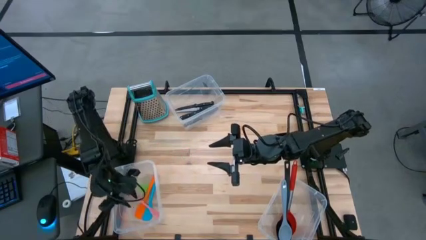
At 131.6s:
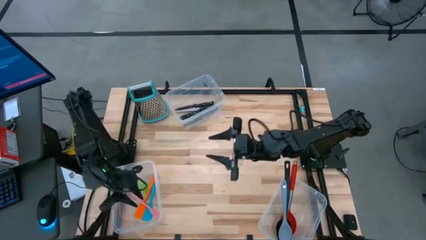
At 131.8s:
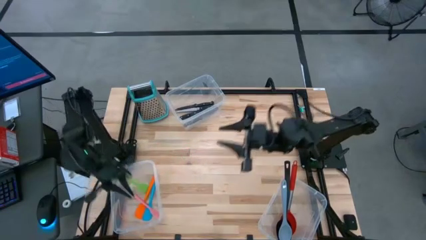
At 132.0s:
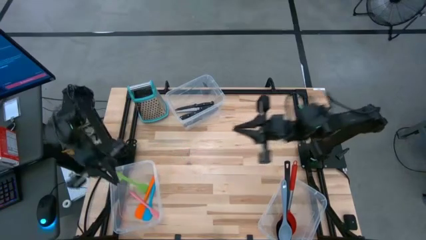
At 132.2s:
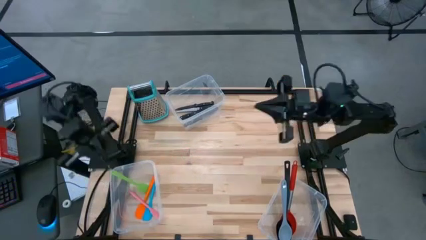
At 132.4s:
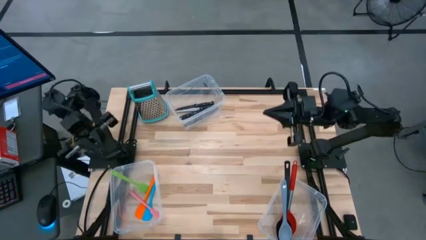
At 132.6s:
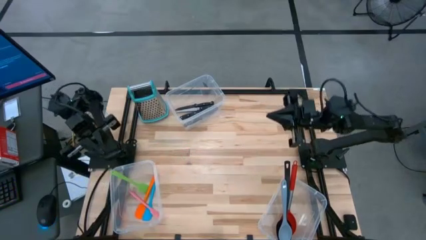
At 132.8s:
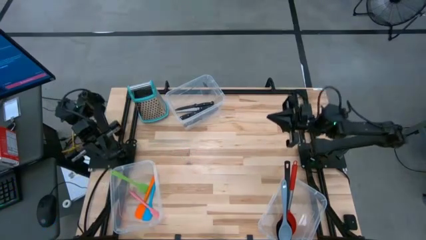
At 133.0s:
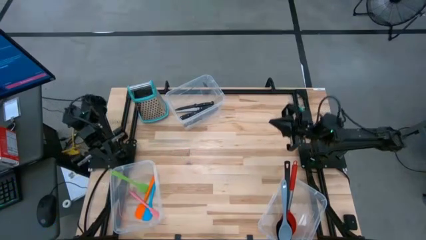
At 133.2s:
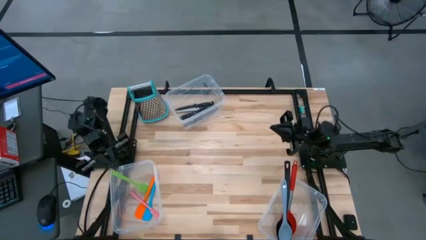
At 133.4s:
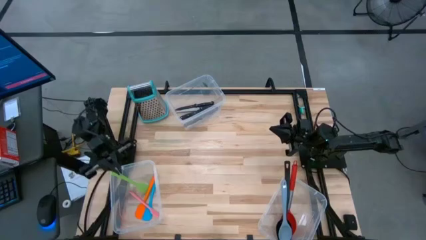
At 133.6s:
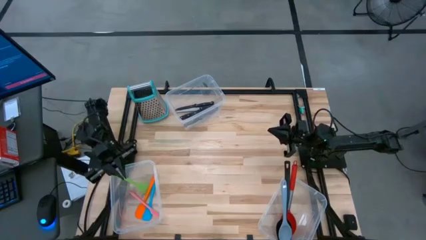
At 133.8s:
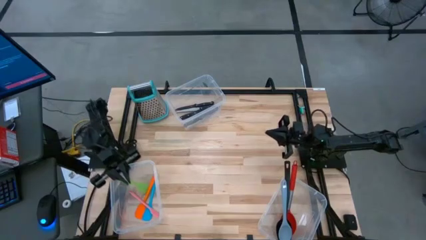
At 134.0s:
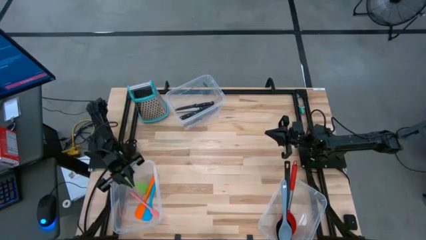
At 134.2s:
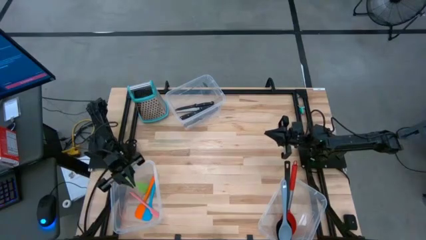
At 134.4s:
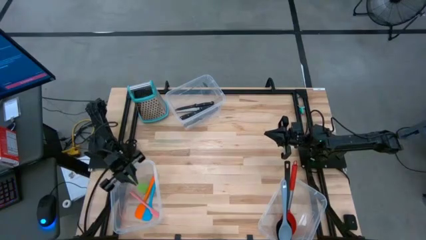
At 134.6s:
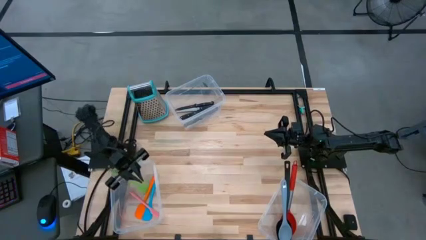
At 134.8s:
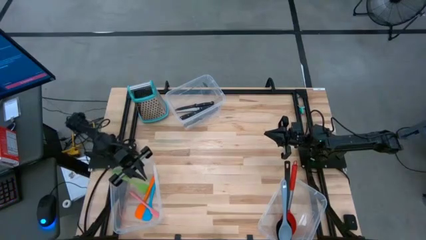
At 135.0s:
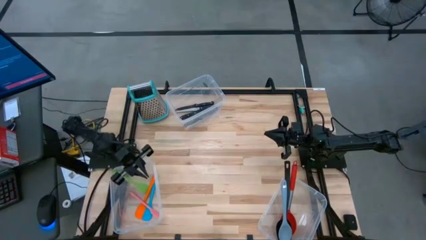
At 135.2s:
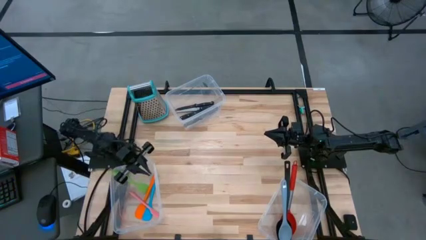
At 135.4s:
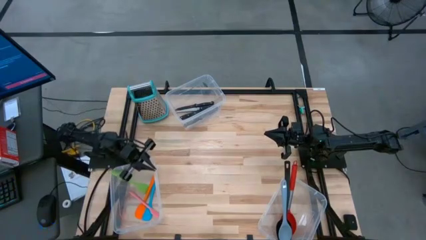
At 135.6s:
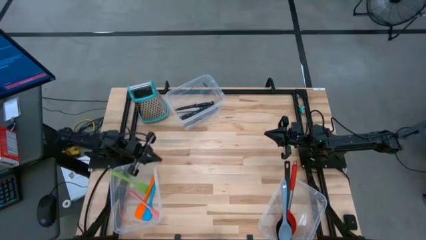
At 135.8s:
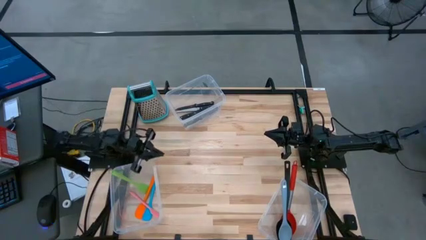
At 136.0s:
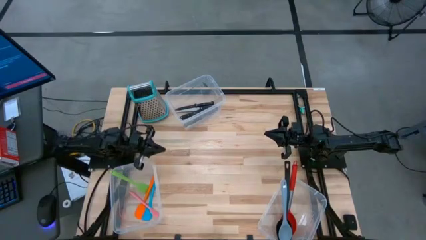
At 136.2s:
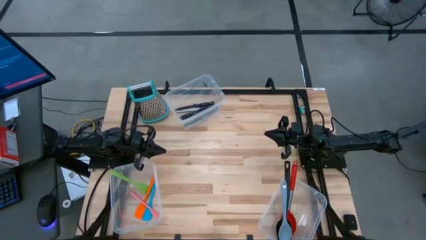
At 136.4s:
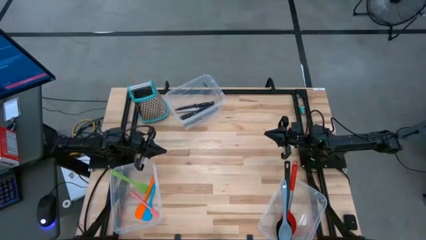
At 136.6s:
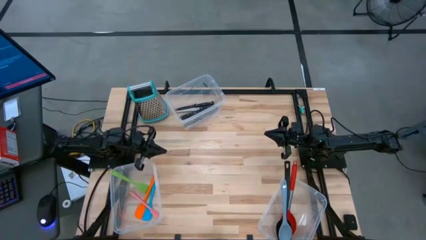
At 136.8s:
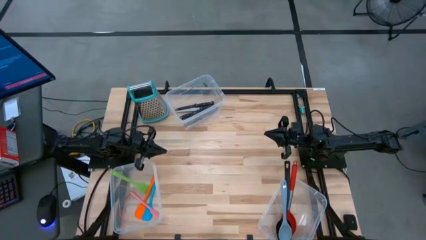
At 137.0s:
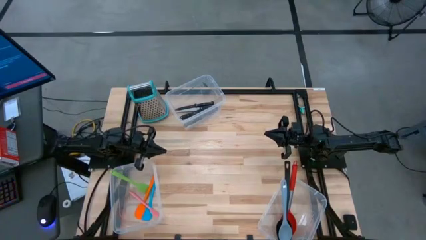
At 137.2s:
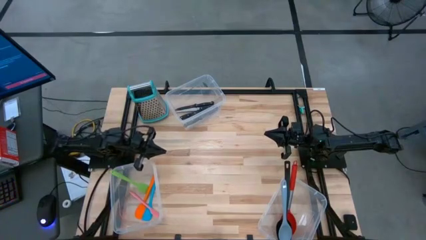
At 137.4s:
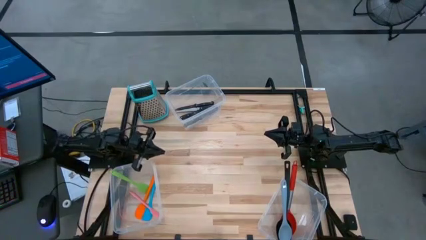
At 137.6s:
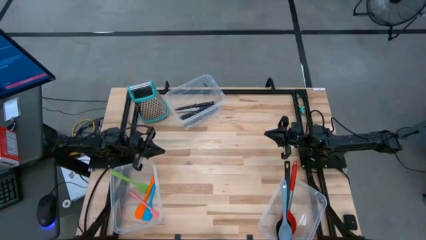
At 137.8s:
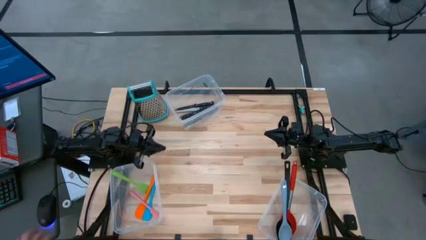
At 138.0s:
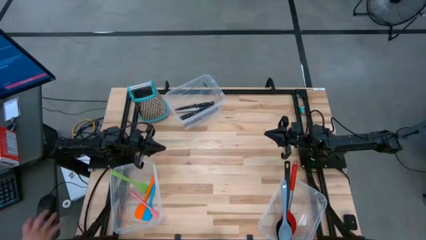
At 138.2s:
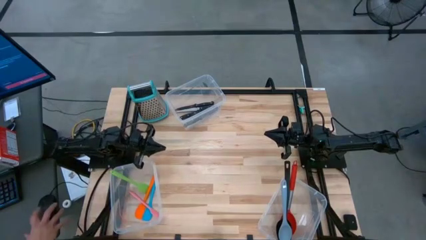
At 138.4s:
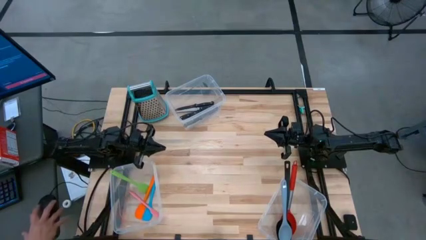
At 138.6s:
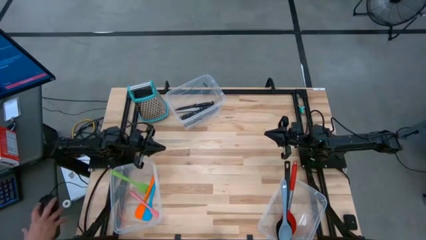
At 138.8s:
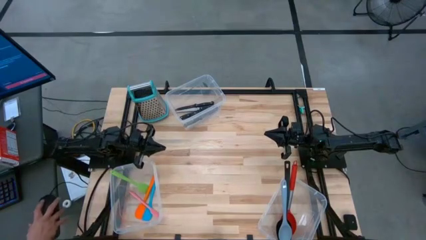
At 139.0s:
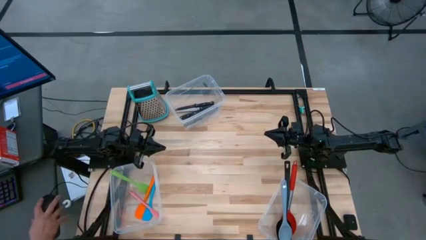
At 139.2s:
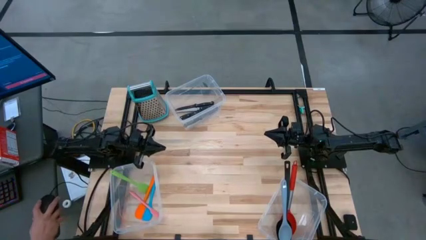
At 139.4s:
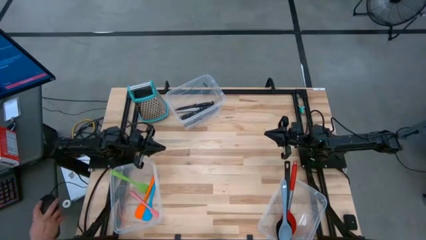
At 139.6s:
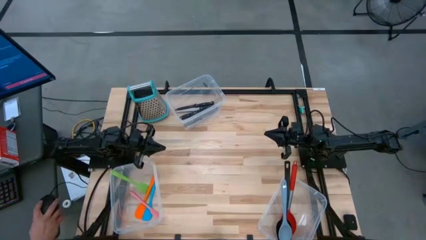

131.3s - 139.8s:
Task: Pick & Place Kitchen Items
Return to Home Position

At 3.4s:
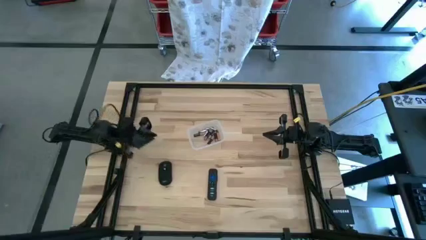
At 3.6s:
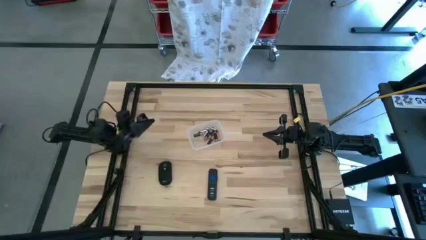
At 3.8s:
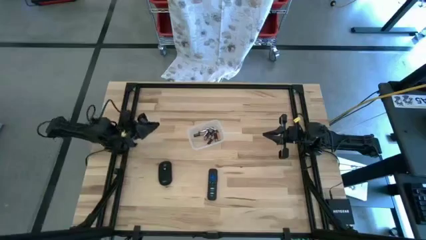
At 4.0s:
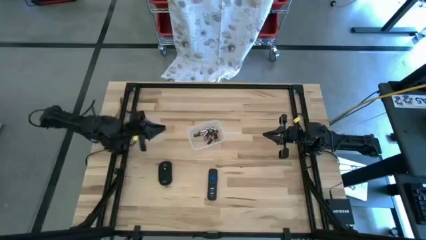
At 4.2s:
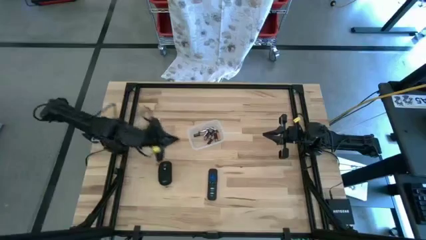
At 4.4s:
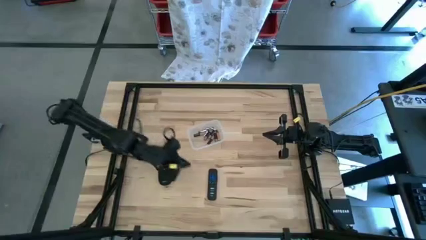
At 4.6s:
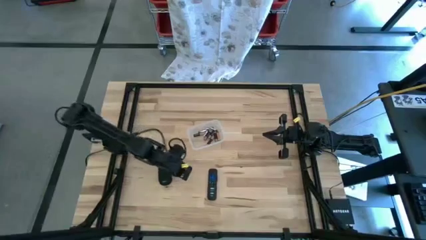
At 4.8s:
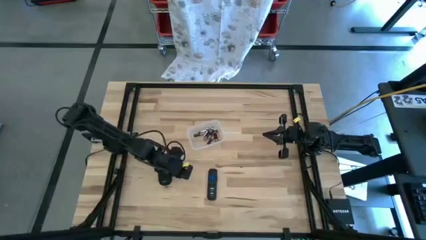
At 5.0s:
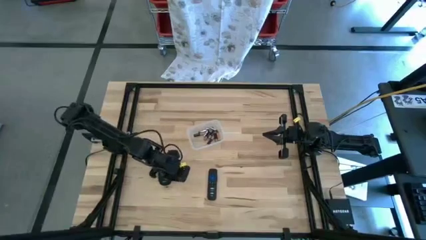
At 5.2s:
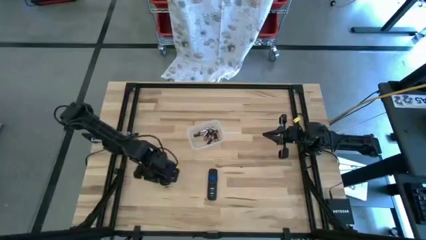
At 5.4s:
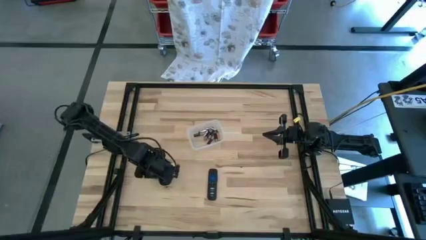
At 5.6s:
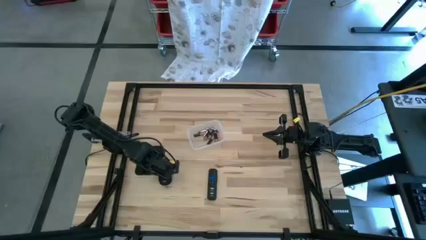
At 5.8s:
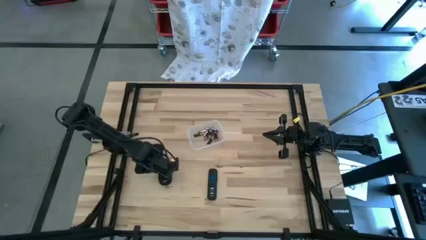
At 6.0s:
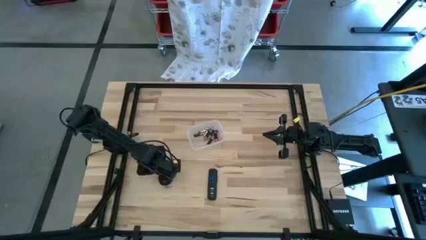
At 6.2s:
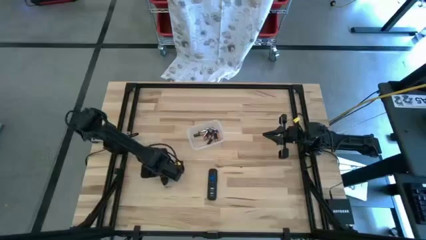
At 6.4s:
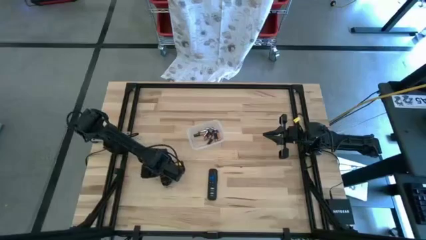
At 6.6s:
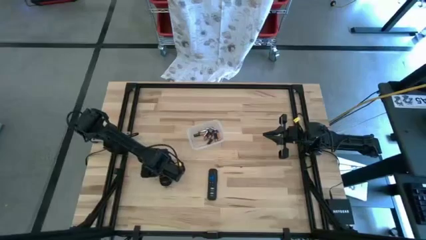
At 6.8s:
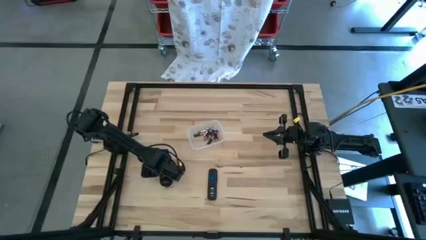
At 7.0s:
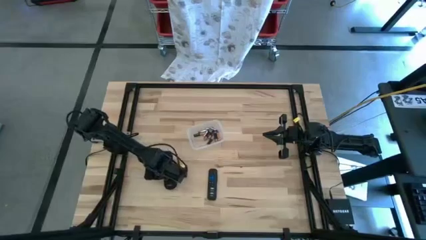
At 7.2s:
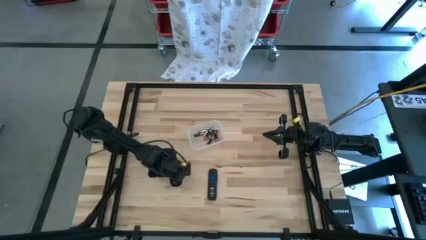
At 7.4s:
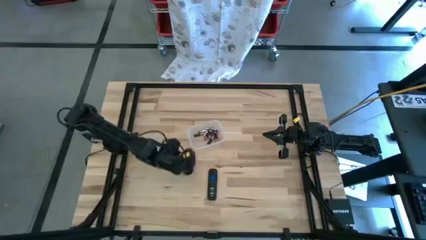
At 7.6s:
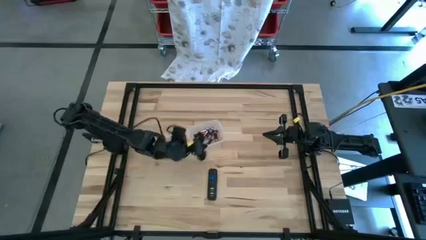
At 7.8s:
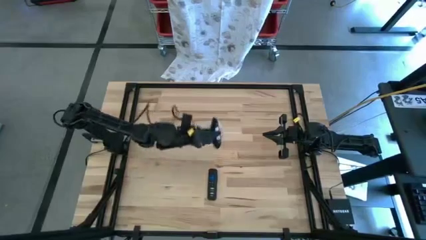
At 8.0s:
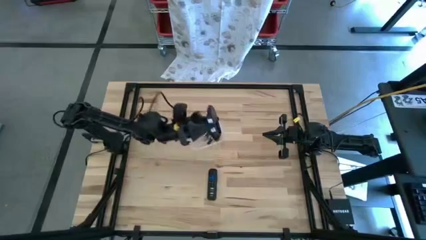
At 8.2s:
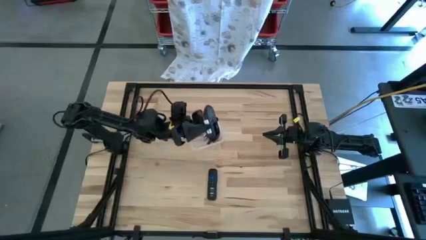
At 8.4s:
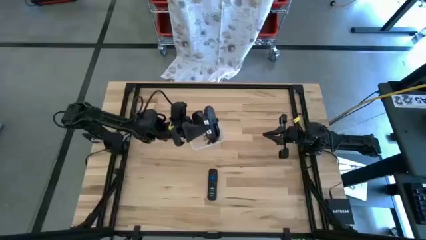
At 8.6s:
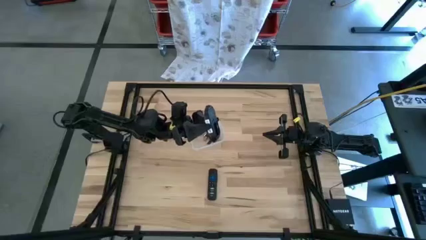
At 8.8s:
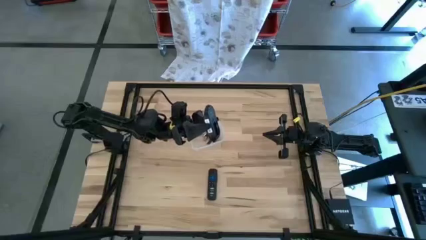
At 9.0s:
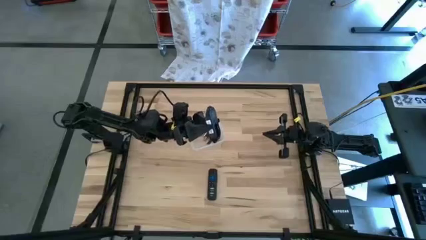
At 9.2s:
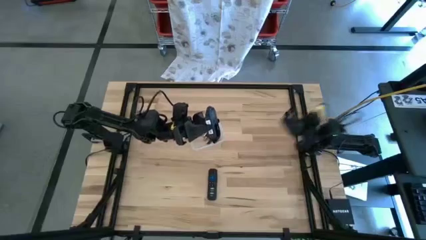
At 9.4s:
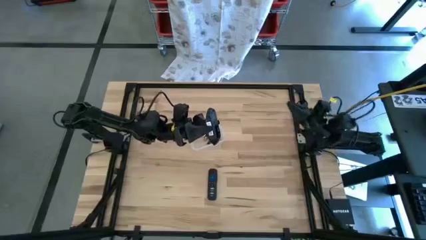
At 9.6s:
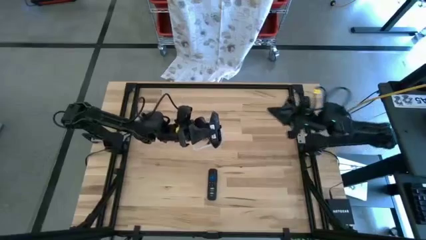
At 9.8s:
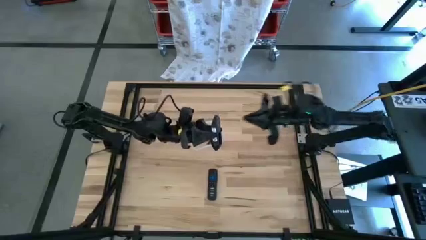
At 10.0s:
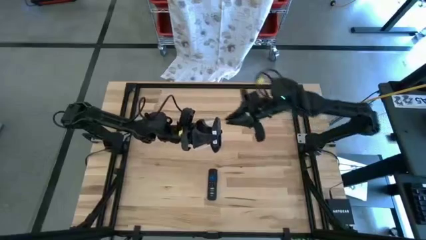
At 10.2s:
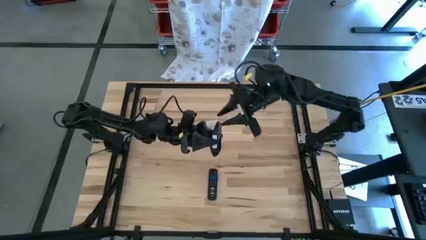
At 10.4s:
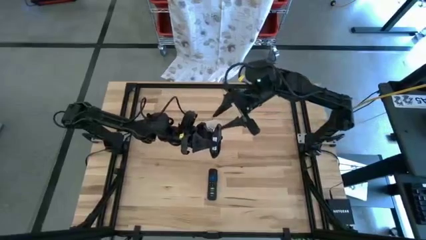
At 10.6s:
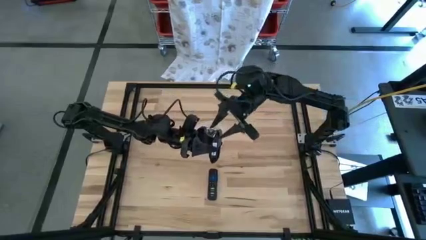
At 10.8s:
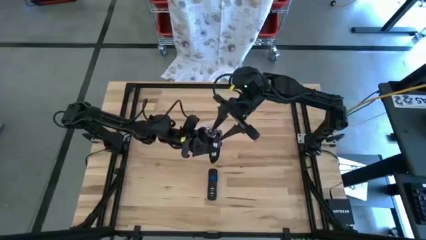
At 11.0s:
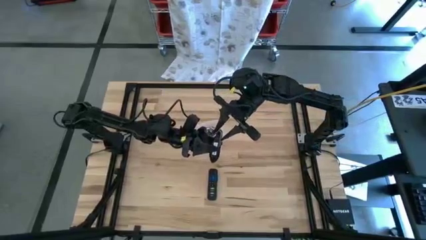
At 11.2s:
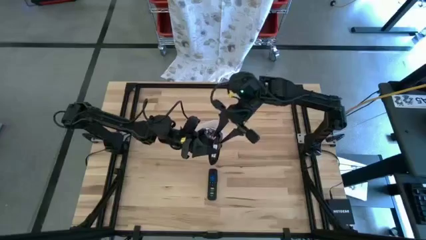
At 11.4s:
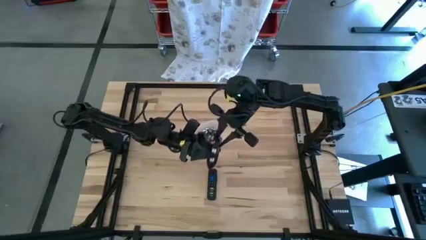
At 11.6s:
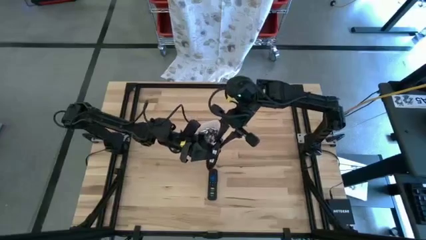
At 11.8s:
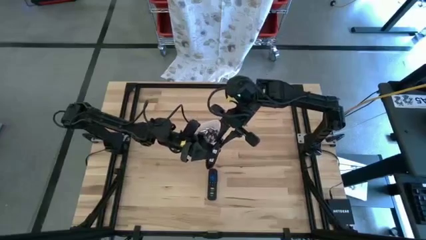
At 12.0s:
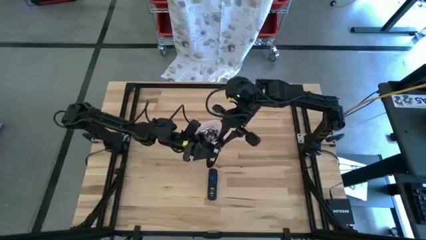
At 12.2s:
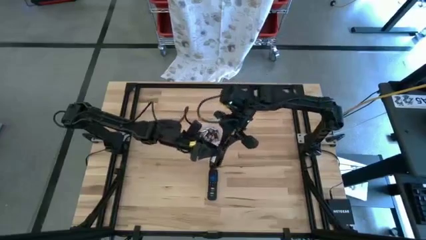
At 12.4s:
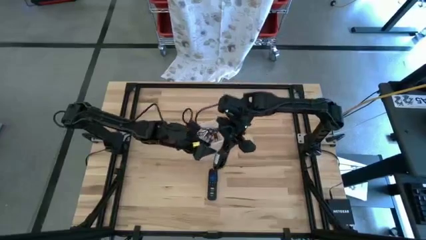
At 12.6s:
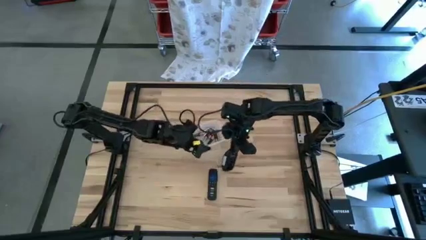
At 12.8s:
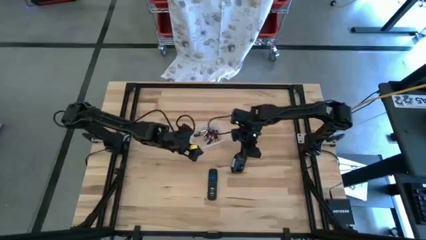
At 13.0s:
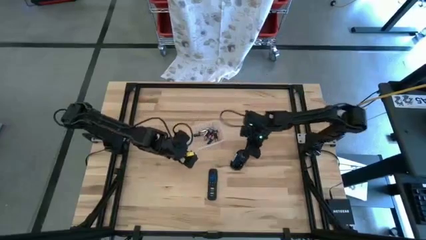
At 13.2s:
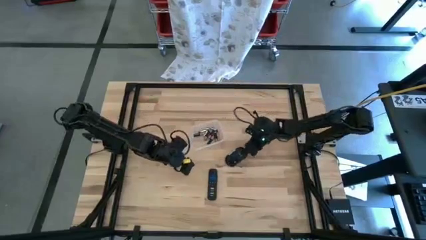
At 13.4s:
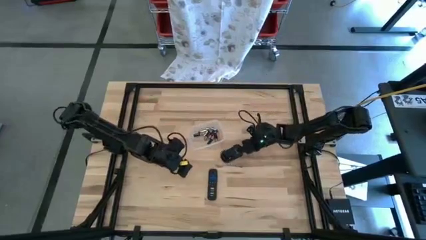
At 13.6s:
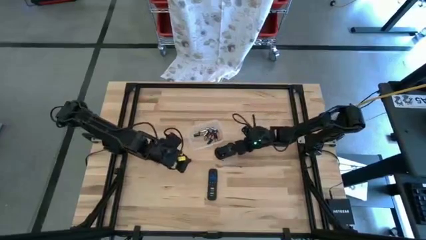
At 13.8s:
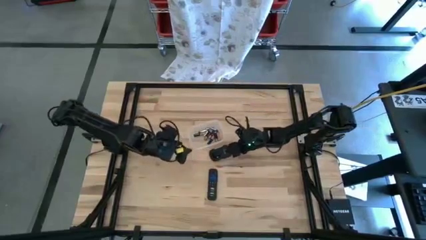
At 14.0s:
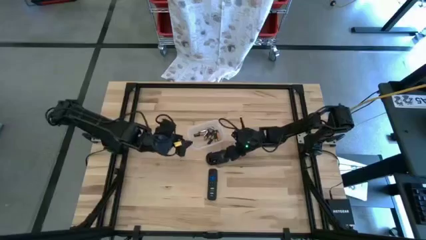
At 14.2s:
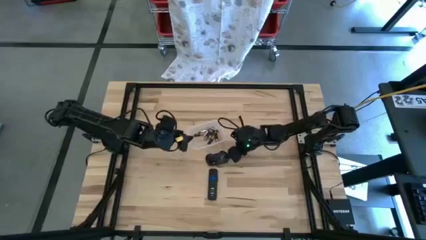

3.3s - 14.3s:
Task: Insert battery
Prepare the mouse for battery insertion
